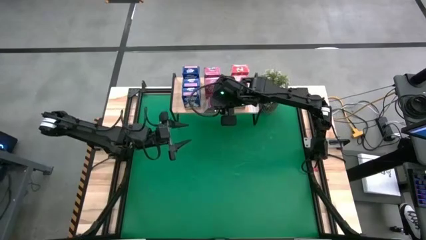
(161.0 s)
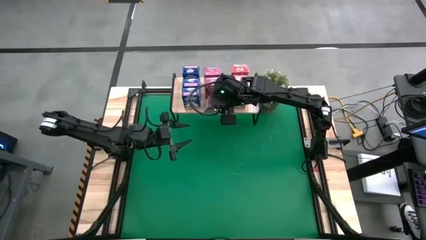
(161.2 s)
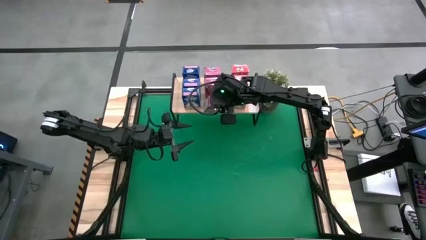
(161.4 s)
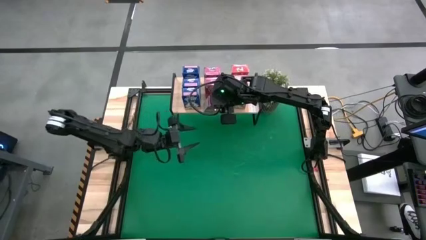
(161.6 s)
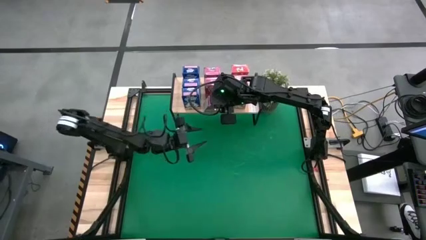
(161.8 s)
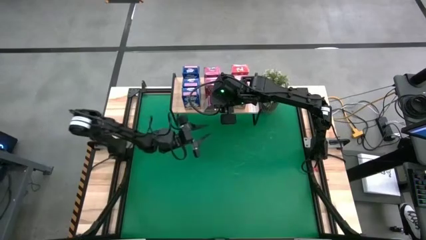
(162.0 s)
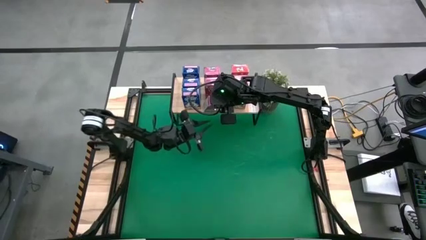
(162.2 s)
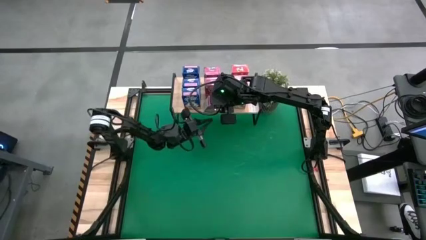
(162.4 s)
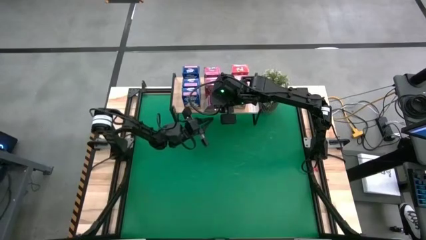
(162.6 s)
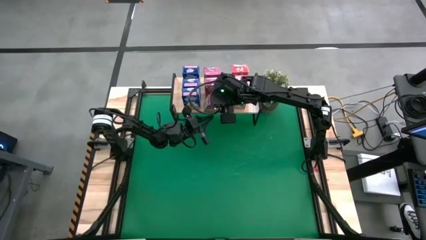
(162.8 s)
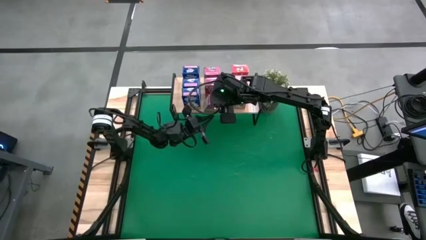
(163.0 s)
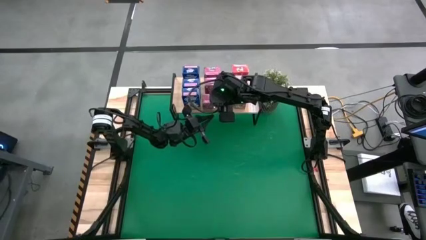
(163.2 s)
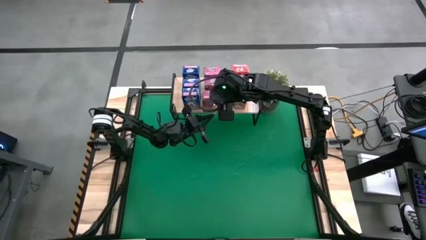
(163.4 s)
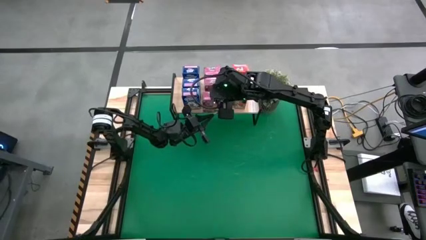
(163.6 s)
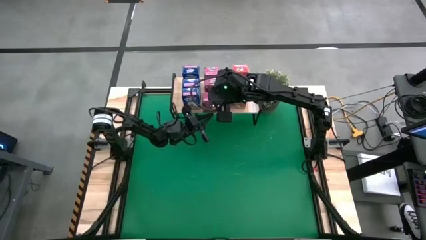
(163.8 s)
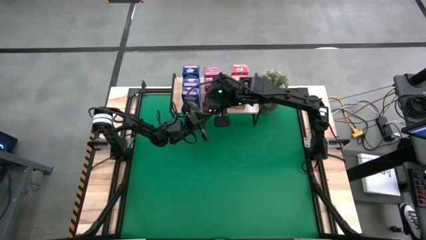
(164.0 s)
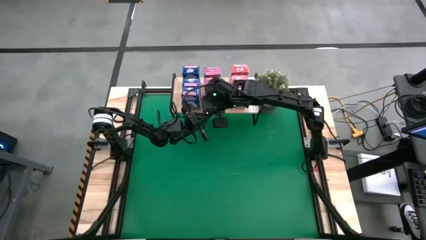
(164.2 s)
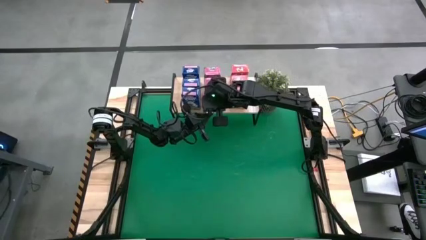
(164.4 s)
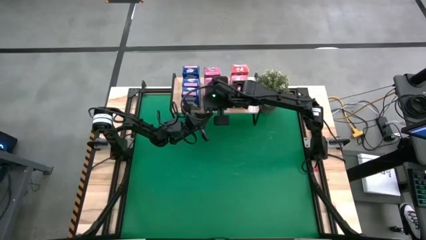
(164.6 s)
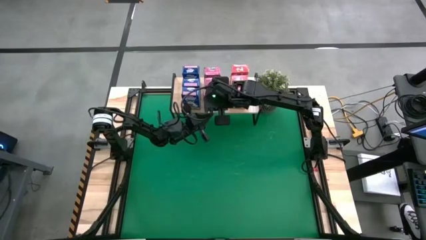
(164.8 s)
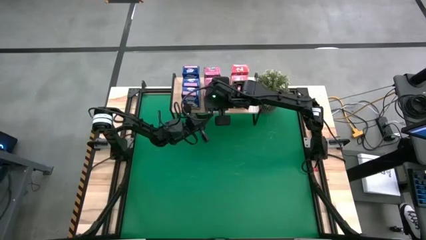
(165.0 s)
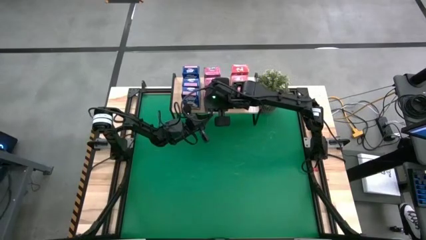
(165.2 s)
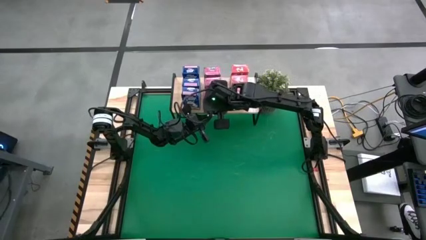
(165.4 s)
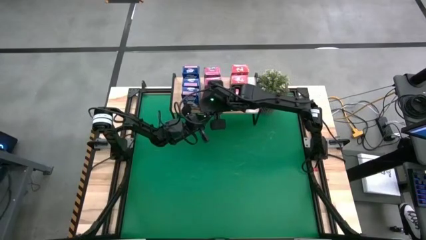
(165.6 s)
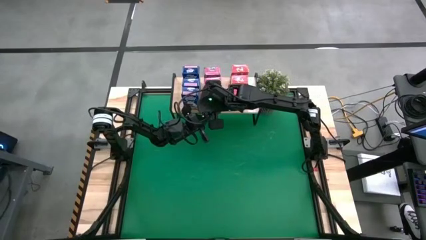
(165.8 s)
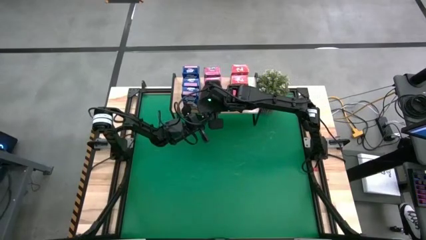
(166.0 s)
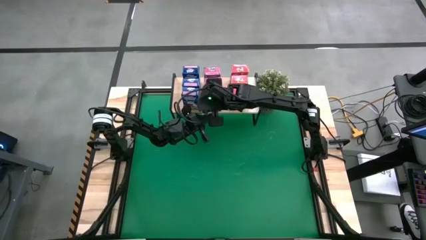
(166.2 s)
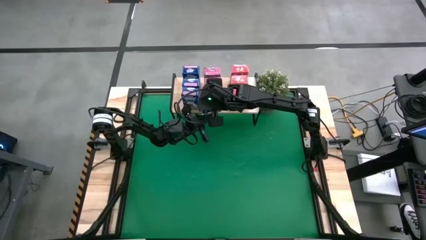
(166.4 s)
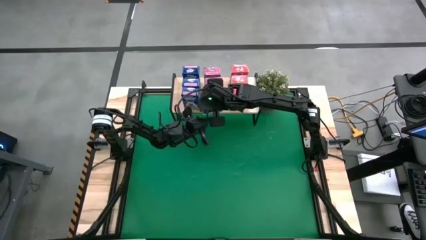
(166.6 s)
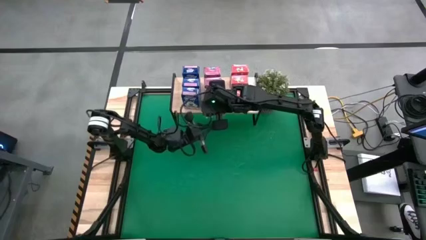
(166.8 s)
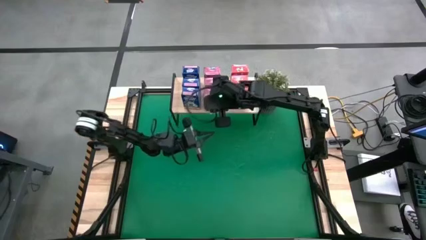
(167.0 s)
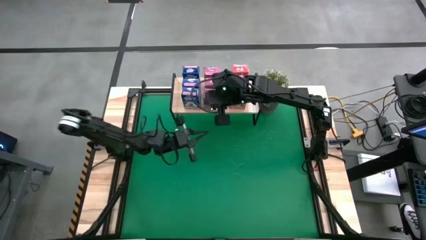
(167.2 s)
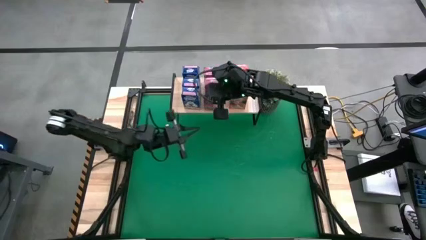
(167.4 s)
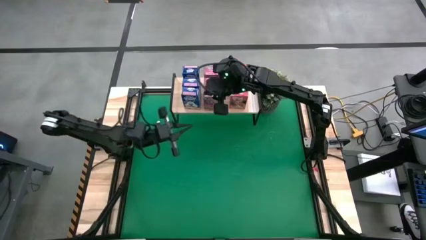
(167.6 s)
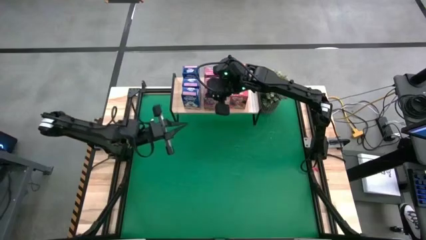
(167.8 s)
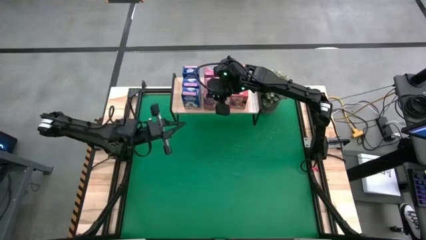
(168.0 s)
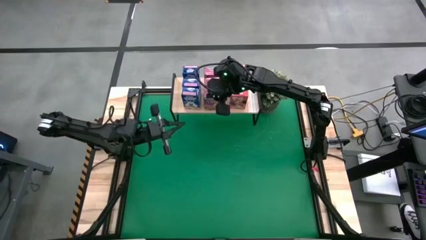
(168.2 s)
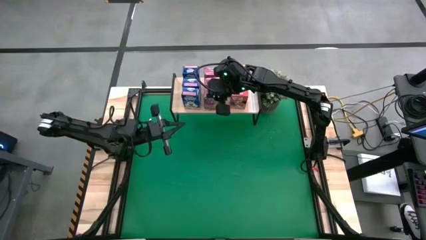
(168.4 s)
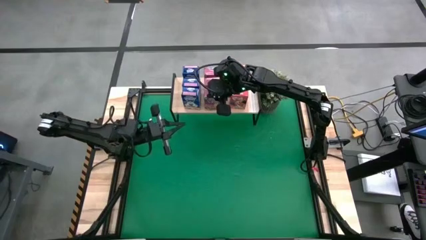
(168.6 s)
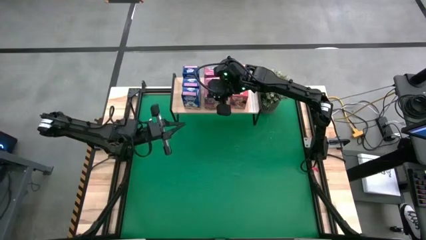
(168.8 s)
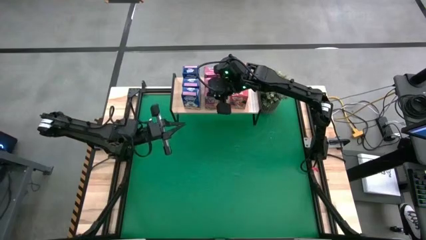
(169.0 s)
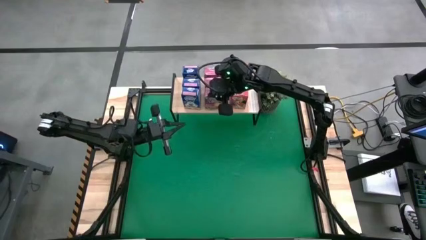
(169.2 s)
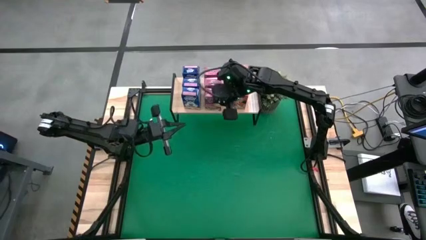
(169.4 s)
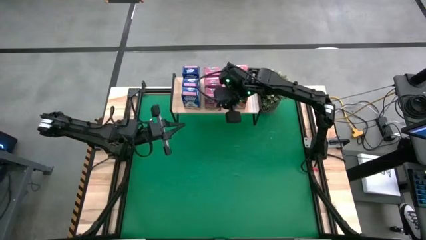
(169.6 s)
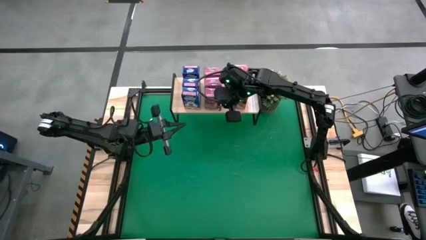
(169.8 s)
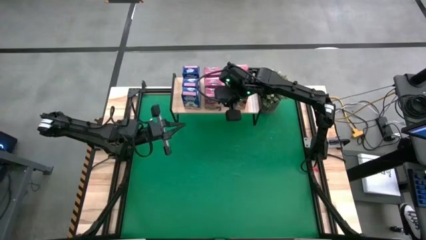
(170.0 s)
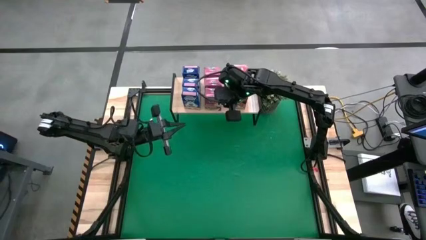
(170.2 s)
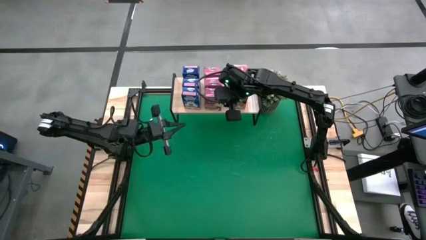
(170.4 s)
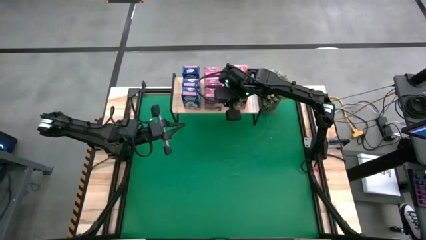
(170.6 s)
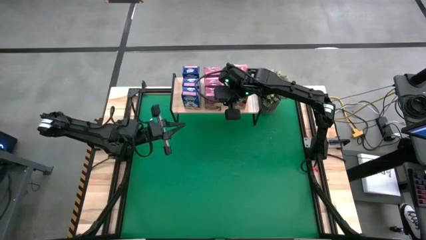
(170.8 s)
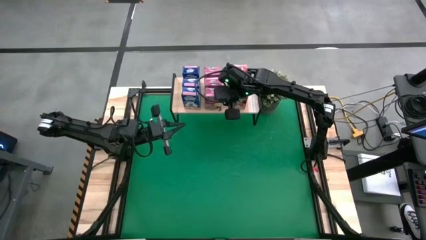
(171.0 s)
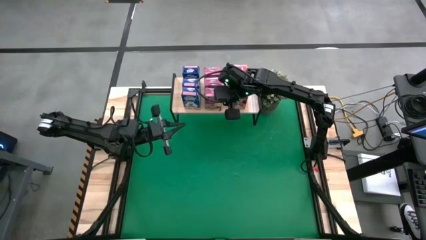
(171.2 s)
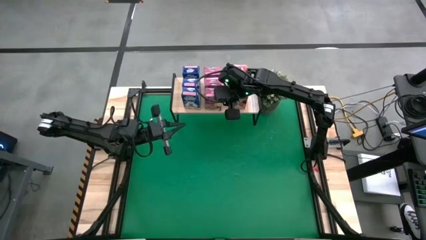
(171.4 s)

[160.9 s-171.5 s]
Task: Stack cereal on shelf
Put the violet cereal box on the shelf aligned with the violet cereal boxes

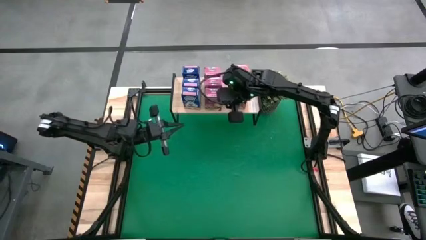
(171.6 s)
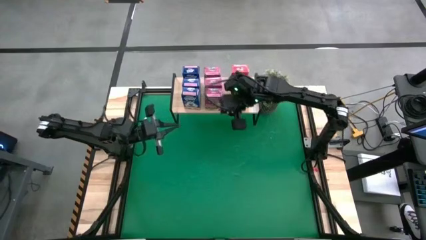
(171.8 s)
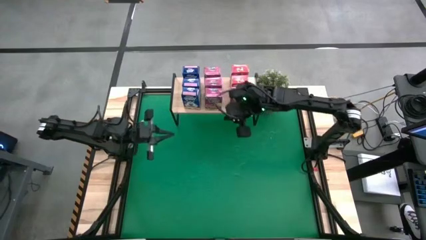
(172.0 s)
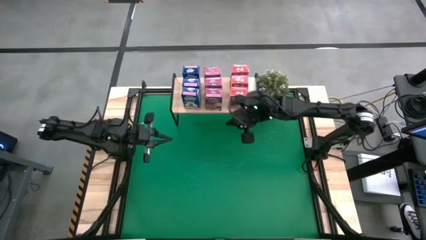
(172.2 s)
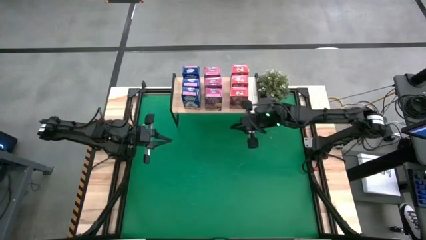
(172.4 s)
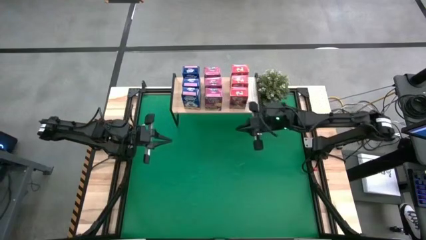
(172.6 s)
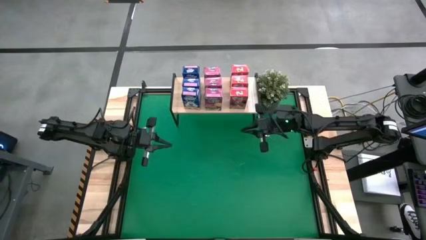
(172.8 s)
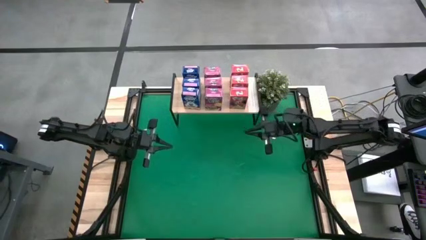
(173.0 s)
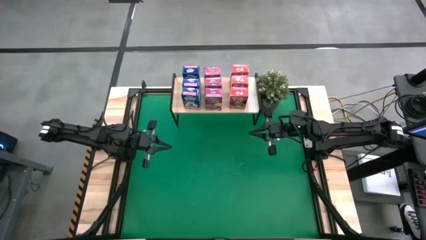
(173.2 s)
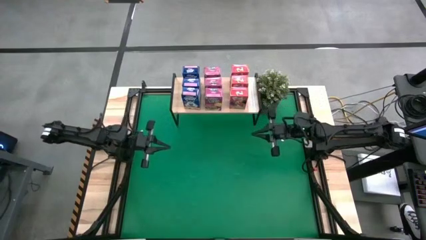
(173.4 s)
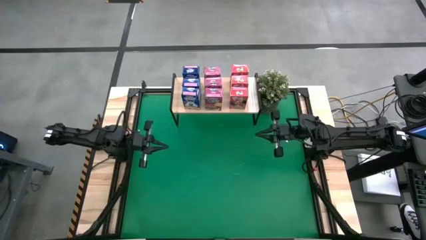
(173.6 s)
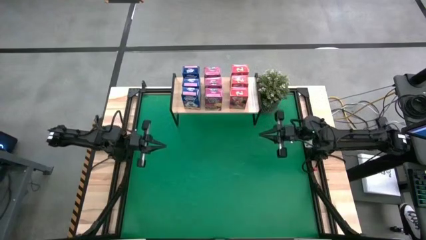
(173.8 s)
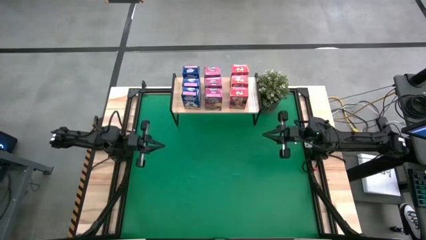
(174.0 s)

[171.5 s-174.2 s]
Return to Home Position

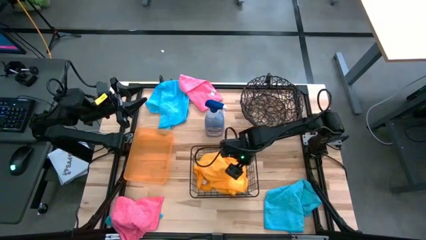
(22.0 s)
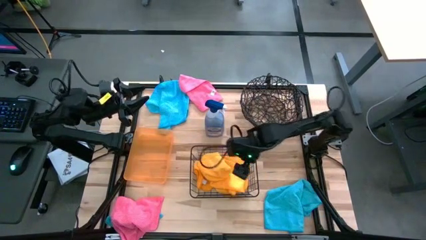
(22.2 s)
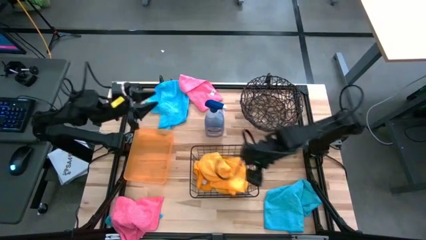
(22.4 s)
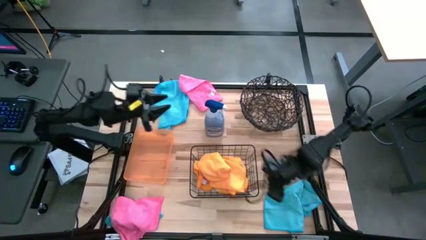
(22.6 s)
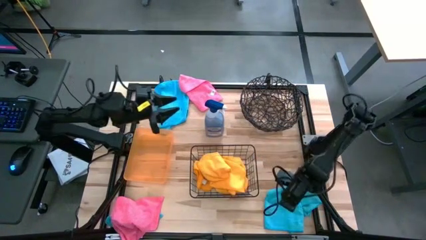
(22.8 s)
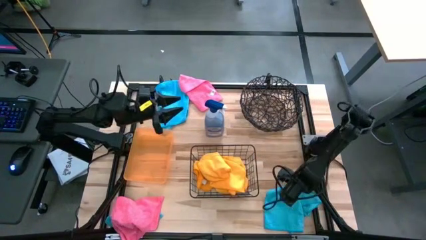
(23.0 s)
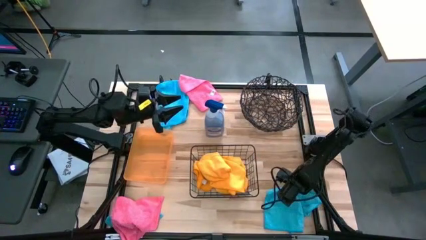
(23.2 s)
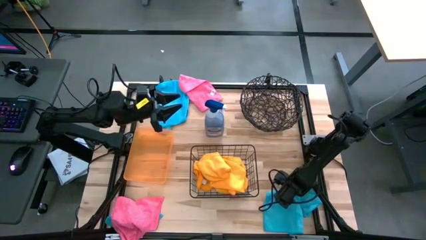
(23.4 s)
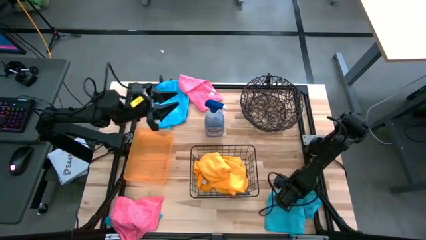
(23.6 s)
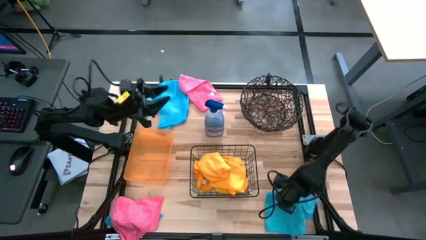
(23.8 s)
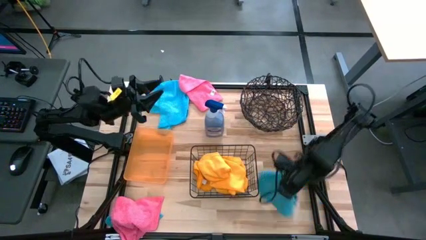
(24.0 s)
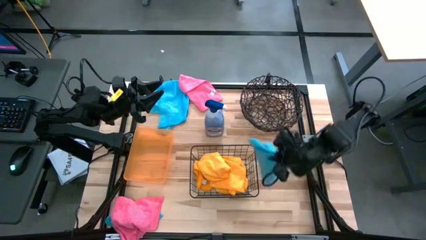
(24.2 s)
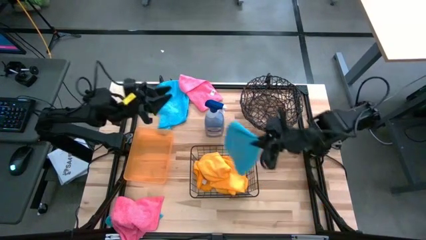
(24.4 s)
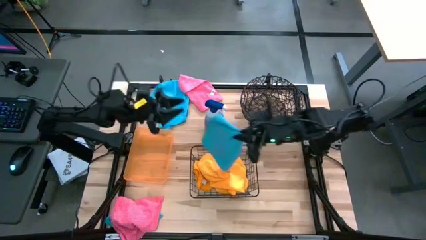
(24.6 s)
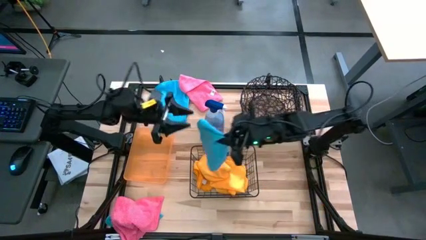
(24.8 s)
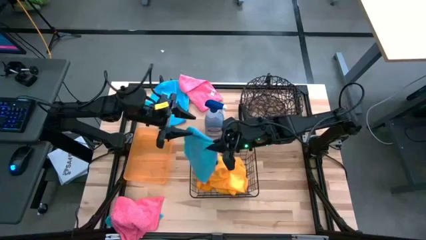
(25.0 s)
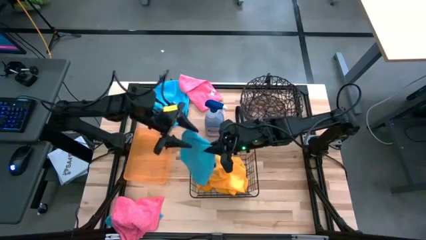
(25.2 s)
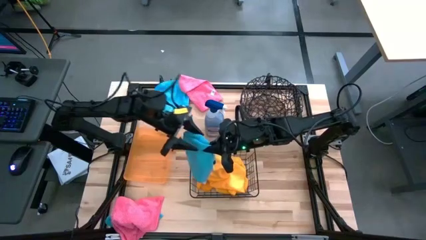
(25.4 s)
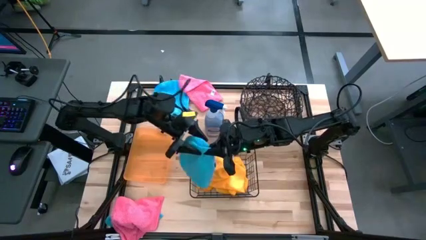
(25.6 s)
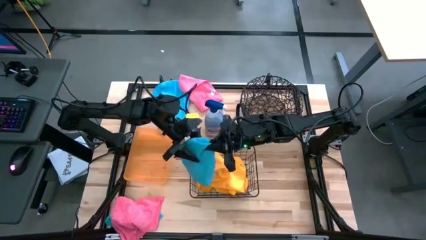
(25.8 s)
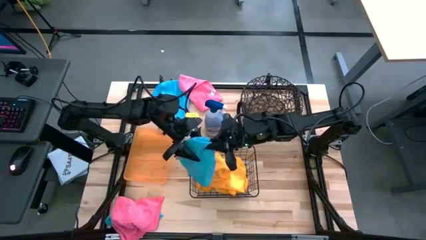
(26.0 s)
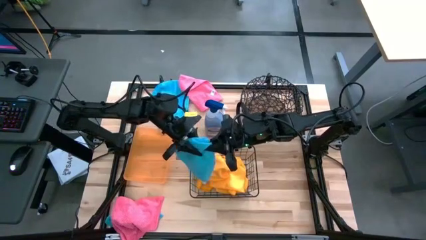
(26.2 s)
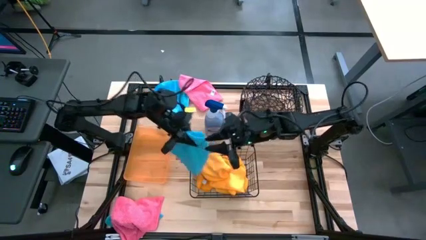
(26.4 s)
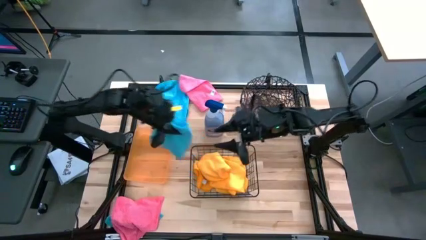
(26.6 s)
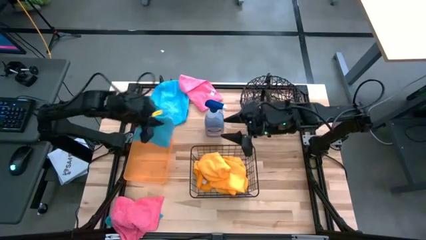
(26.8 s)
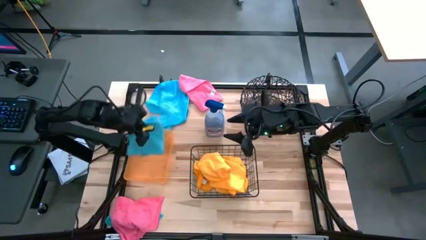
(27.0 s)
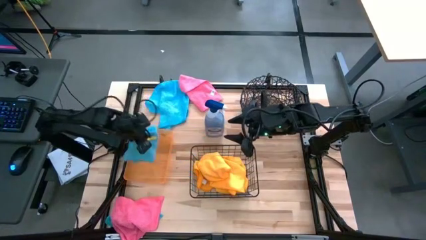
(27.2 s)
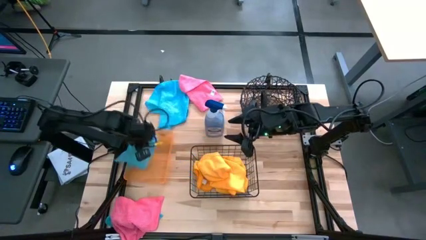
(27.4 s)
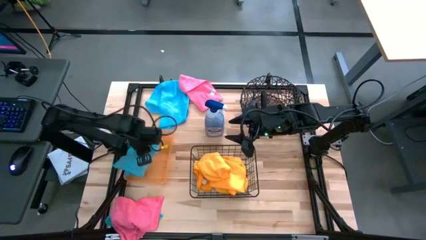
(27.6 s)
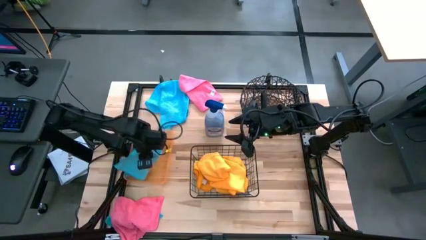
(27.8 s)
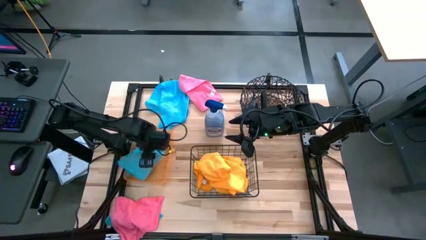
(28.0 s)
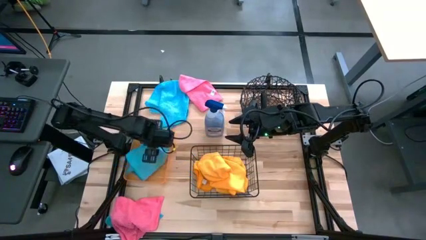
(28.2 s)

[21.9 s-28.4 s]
Task: Sort microfiber towel by color & place in baskets
Put the bottom blue microfiber towel into the orange bin
